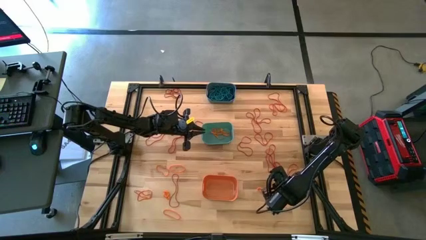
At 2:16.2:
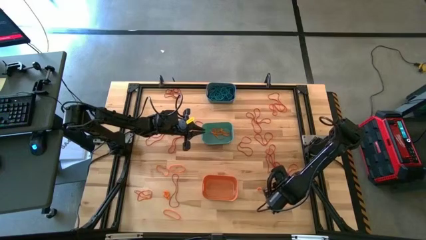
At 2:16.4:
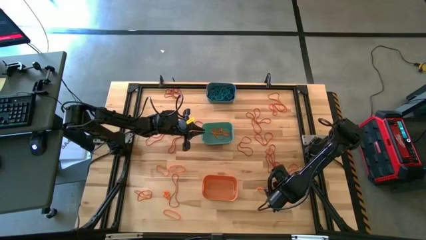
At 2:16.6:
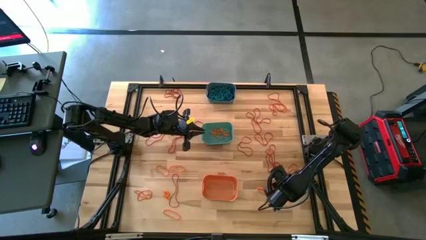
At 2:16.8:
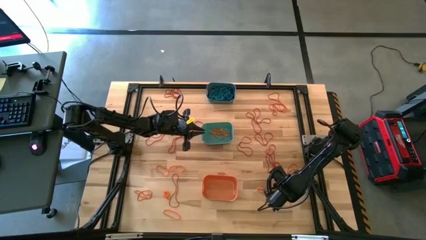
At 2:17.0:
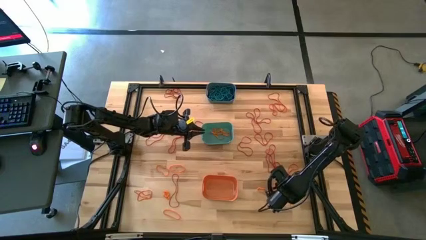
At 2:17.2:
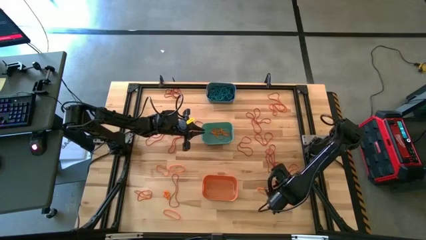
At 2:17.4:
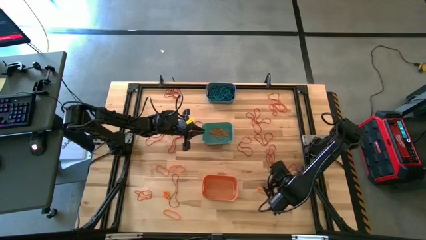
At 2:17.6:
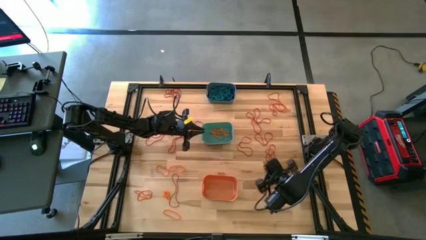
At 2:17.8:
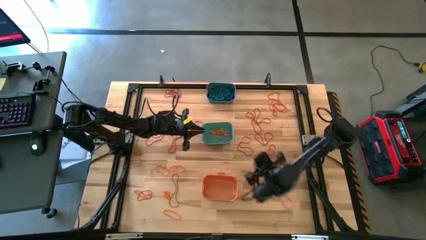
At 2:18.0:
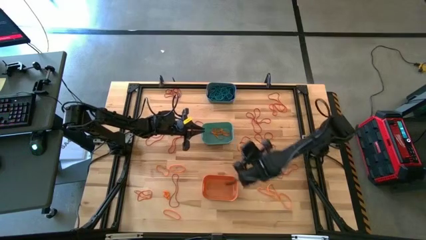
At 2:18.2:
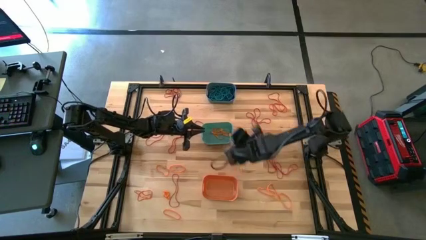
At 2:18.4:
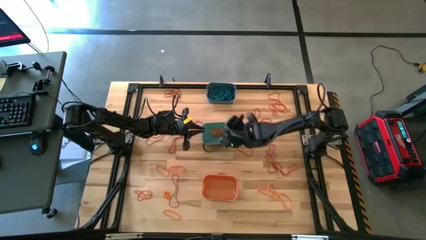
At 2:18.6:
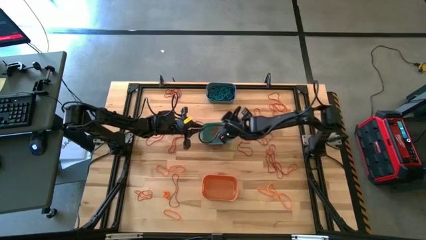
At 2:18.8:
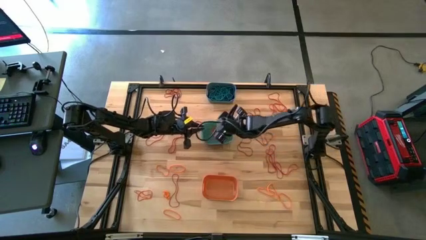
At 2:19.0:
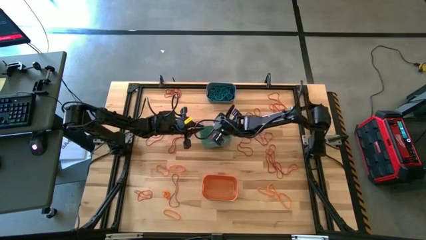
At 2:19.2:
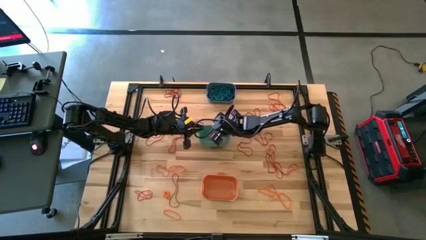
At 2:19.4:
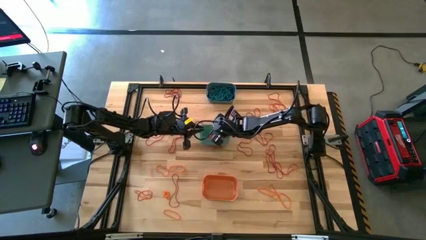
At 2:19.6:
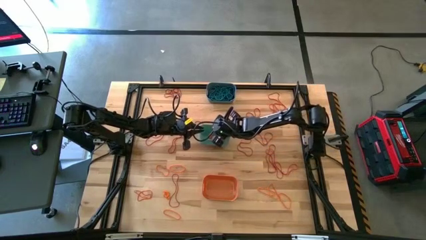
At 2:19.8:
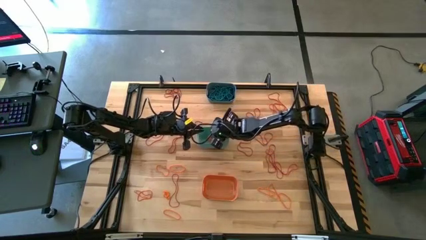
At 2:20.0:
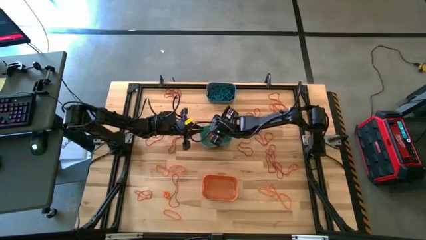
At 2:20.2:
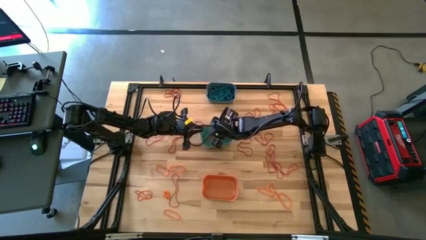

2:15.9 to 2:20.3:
Task: Sort rubber bands into baskets
Put the orange rubber band into the green bin

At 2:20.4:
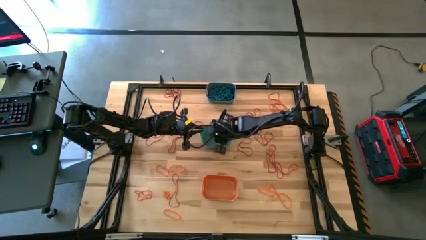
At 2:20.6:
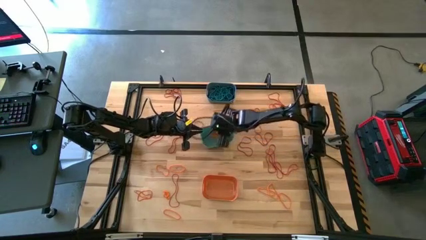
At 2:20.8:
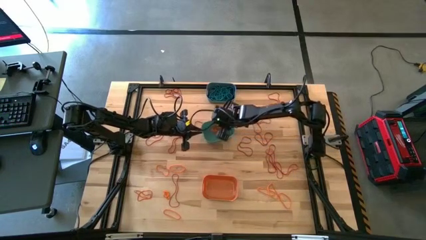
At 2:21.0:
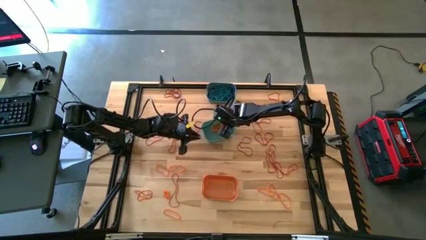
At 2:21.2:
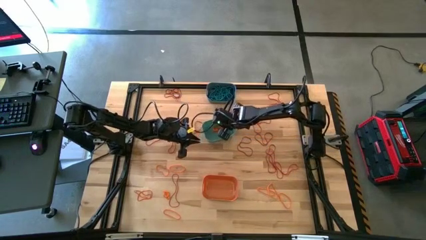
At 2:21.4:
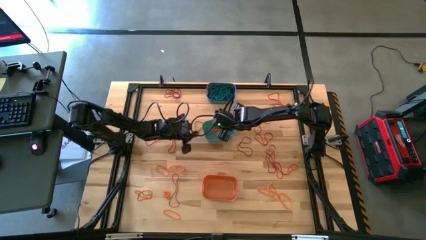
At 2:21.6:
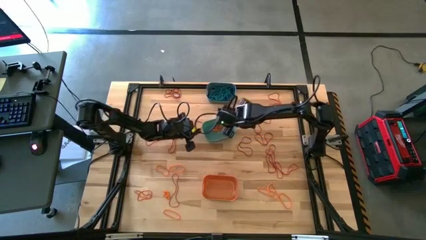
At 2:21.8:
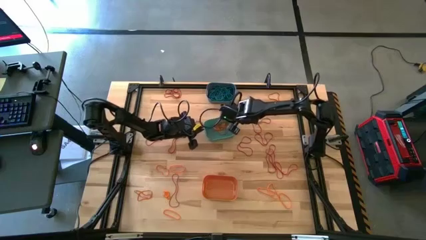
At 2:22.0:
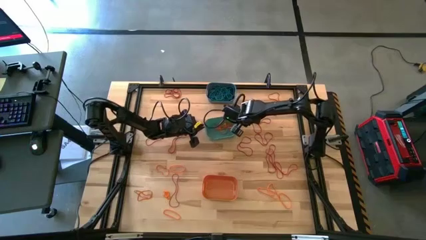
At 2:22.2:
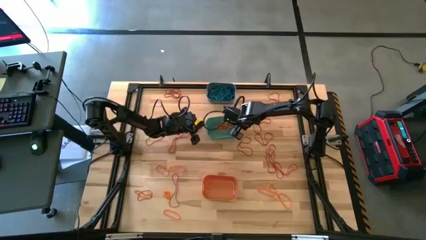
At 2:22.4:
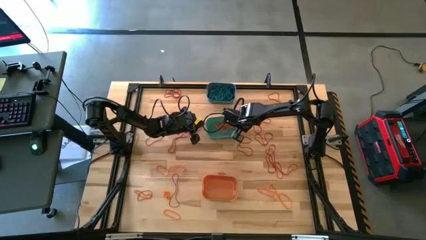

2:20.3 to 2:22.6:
Adjust the green bin on the table

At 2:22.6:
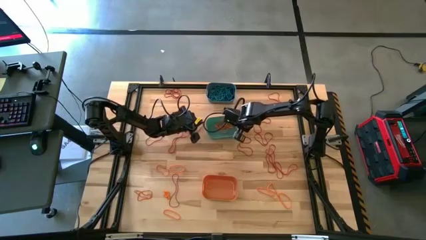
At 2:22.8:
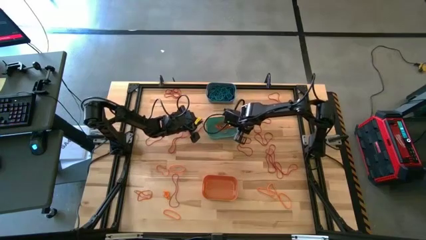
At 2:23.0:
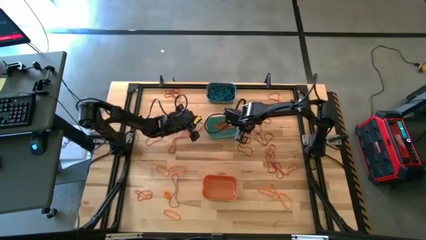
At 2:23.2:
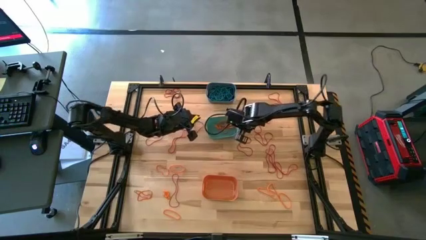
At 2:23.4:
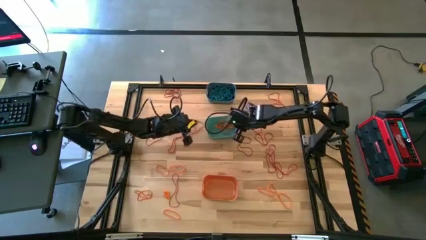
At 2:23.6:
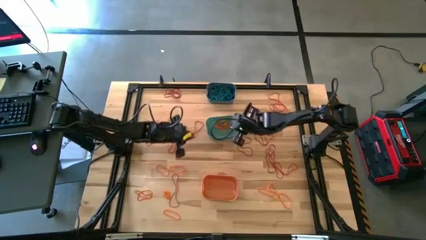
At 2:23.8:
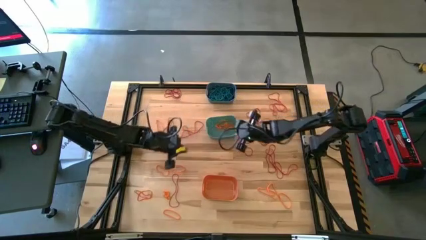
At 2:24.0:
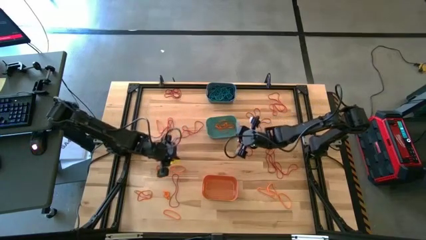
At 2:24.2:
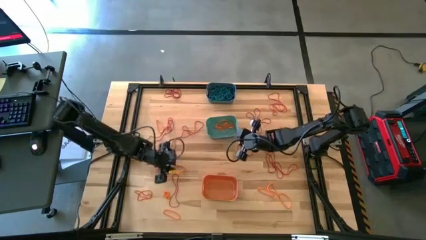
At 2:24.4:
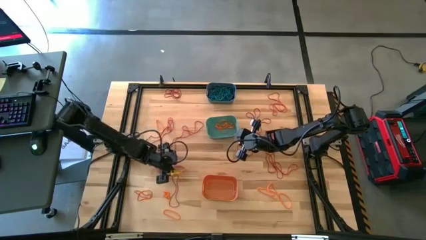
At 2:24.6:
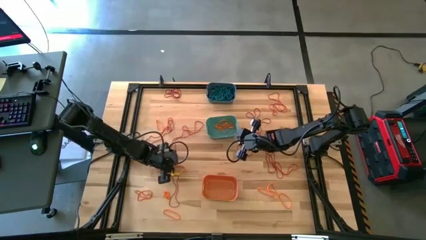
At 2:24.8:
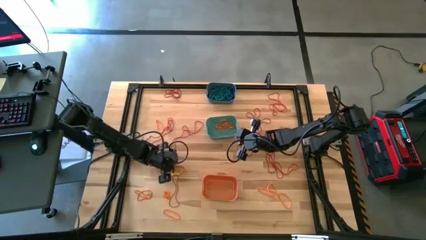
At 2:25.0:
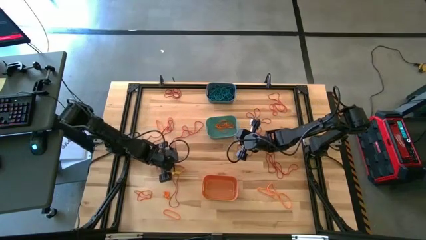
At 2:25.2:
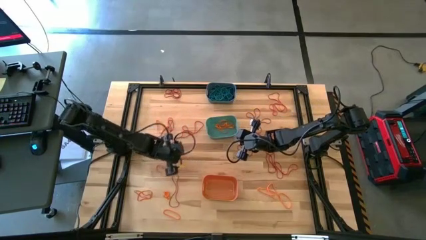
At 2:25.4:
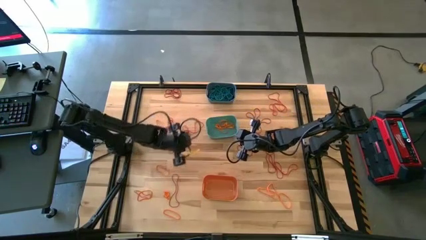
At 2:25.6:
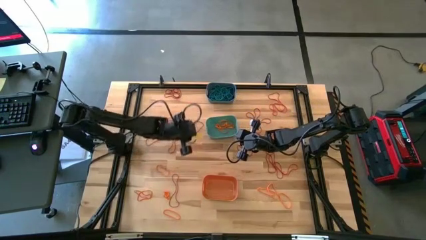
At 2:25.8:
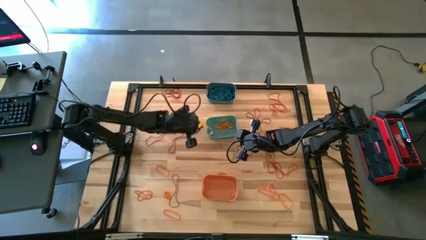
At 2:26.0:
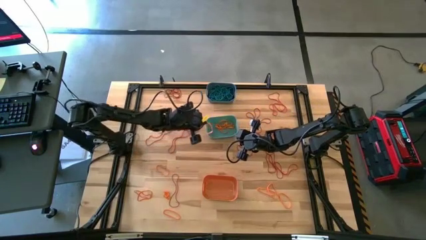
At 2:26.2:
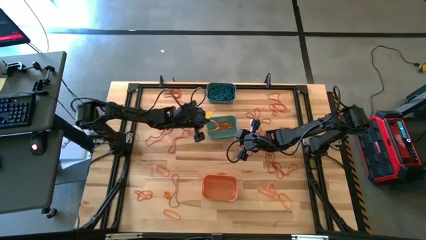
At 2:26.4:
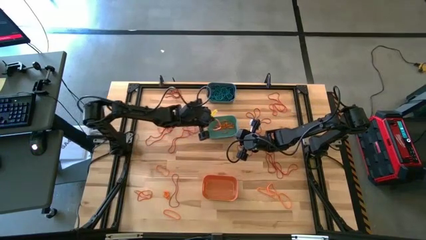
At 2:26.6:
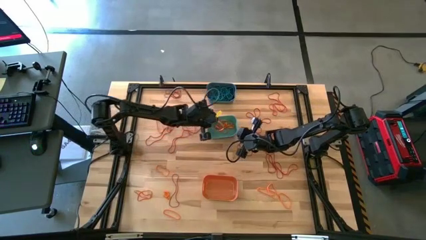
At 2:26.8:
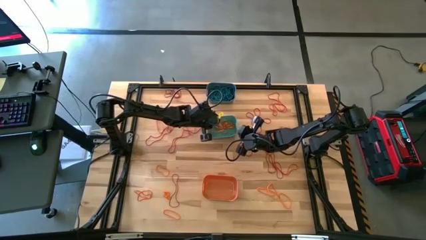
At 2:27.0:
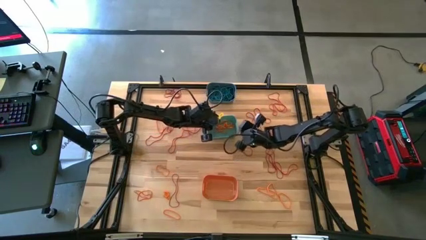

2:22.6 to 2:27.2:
Put the orange rubber band into the green bin

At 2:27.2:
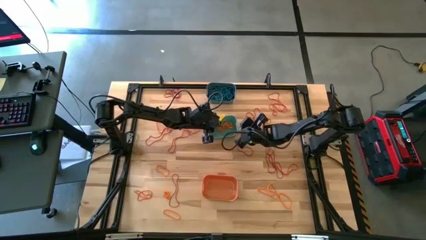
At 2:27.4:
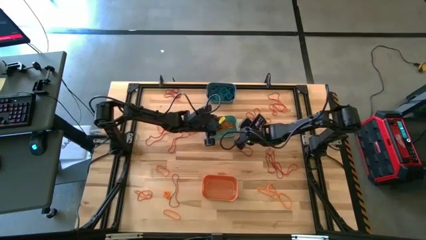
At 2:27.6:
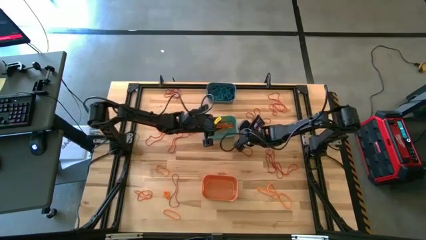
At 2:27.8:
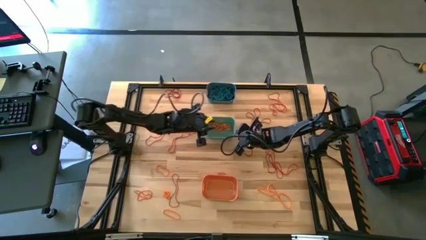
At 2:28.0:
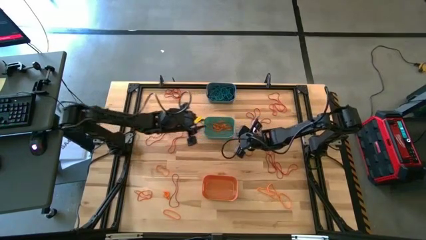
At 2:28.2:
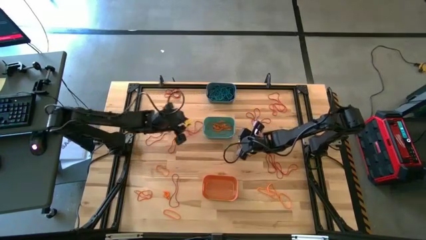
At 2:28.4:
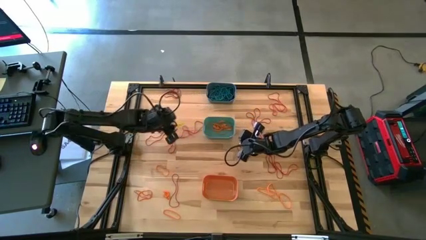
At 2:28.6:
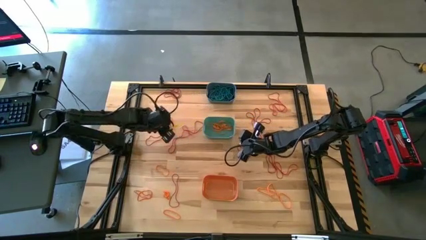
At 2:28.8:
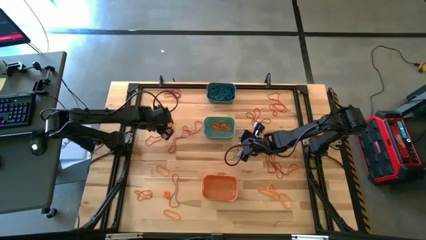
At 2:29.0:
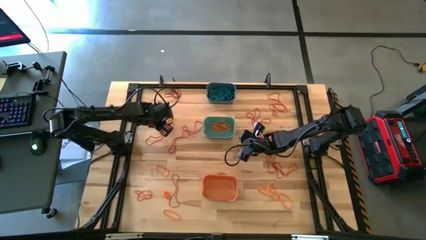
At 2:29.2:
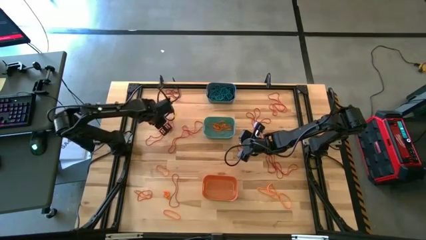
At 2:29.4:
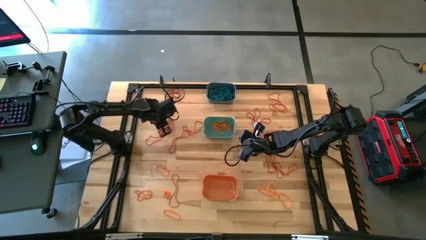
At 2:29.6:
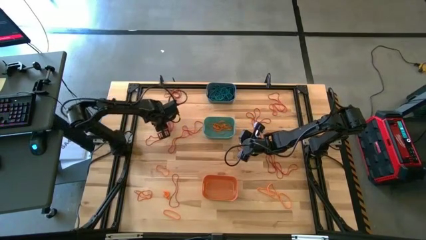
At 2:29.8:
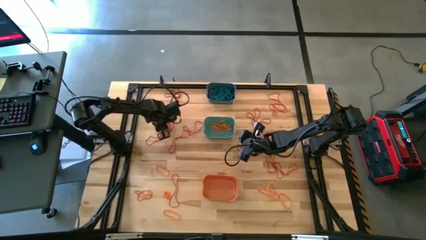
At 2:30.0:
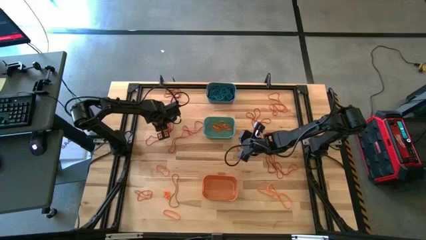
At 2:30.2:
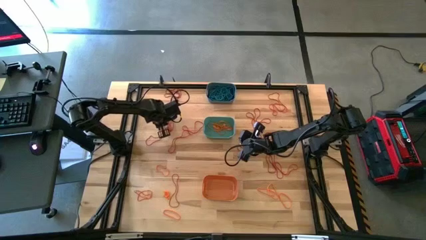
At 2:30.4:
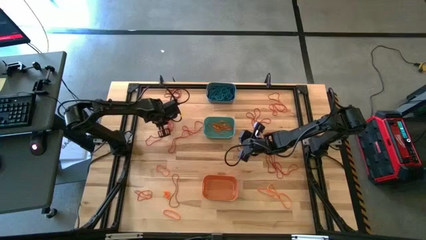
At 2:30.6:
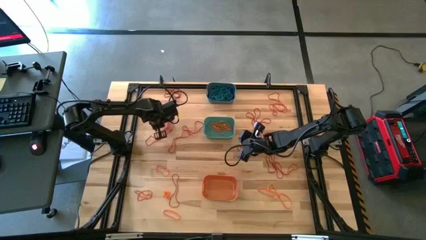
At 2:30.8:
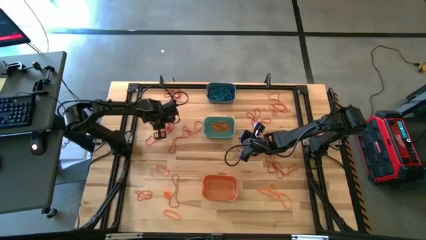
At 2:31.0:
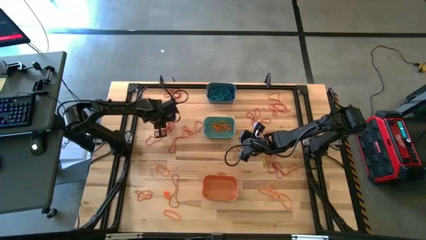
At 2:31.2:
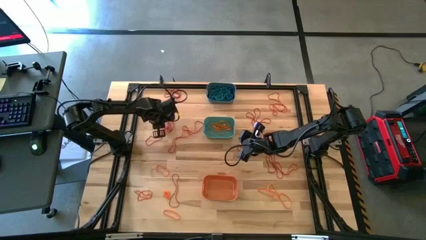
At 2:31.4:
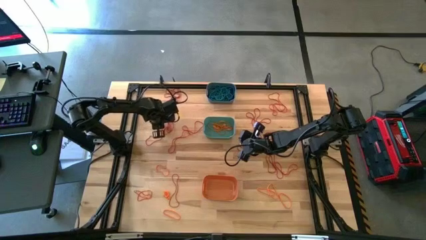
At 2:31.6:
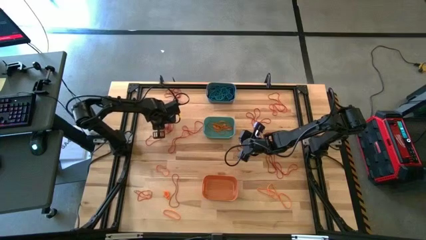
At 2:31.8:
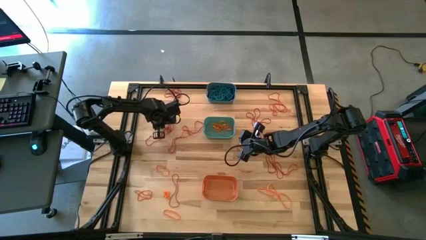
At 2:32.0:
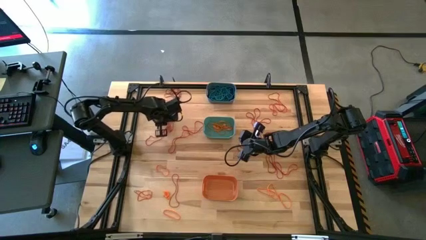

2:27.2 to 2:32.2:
Put the orange rubber band into the green bin
